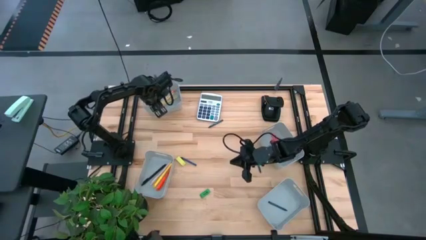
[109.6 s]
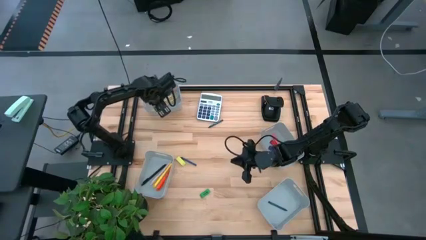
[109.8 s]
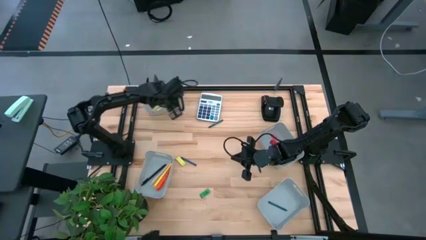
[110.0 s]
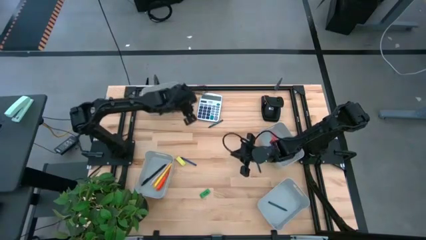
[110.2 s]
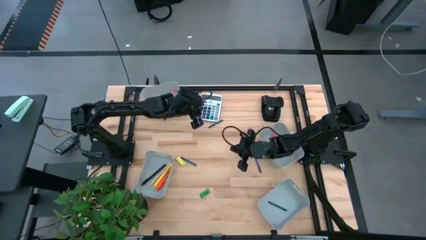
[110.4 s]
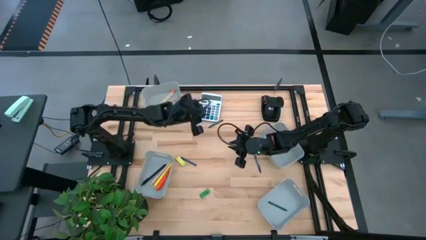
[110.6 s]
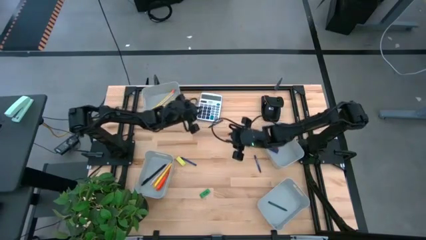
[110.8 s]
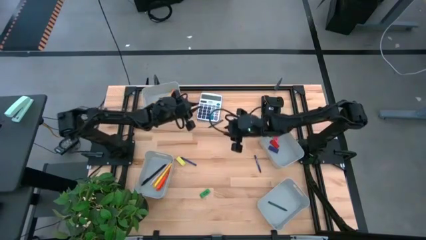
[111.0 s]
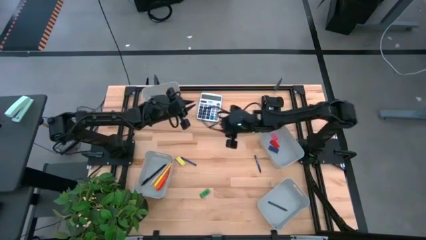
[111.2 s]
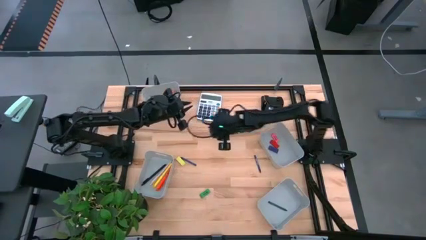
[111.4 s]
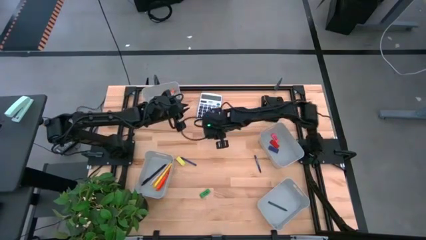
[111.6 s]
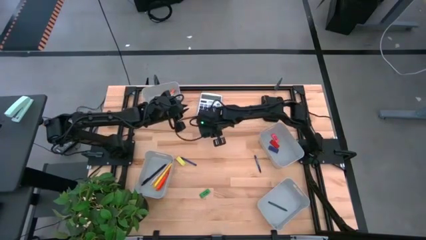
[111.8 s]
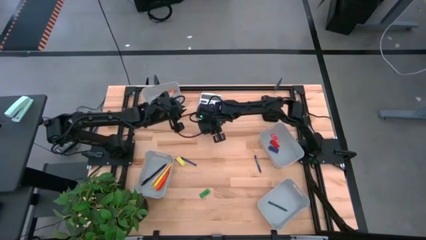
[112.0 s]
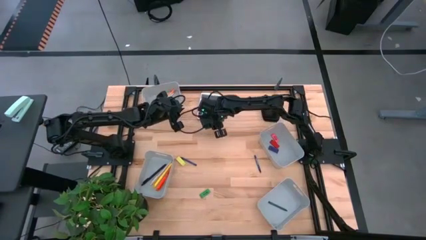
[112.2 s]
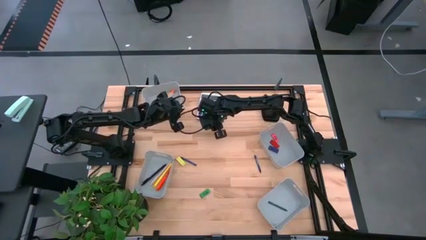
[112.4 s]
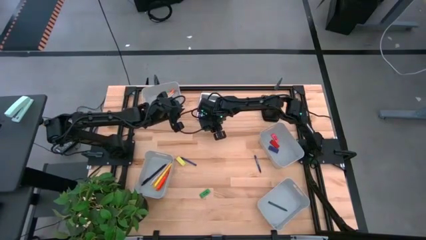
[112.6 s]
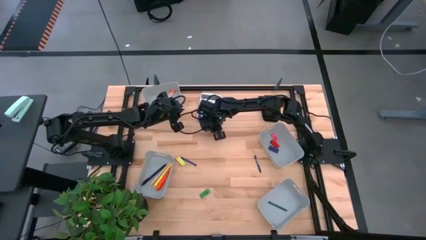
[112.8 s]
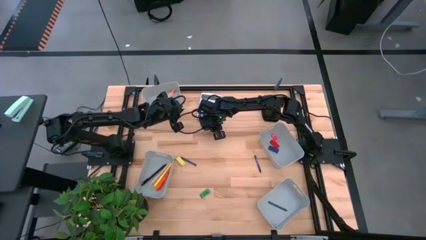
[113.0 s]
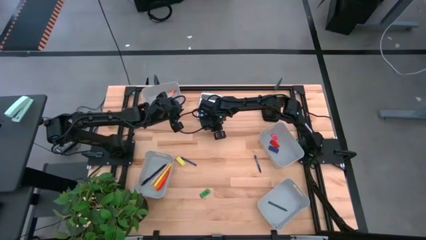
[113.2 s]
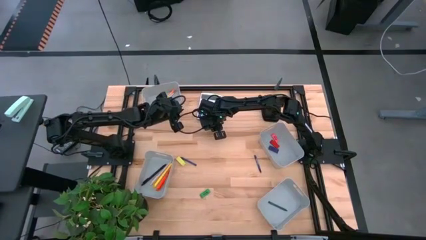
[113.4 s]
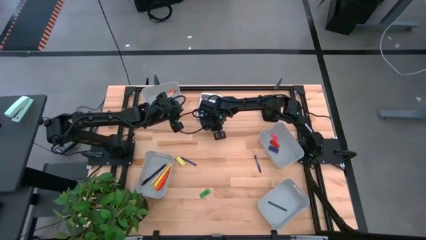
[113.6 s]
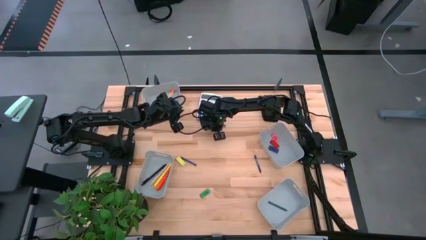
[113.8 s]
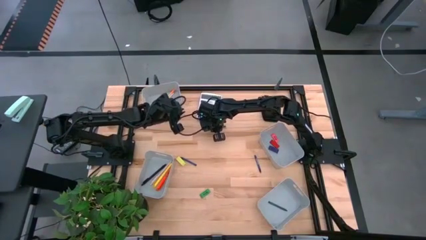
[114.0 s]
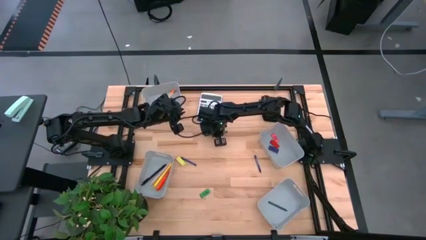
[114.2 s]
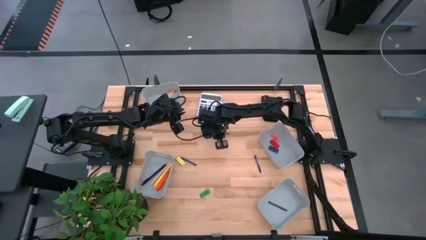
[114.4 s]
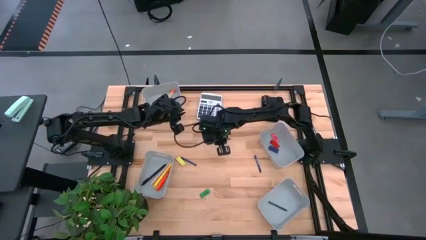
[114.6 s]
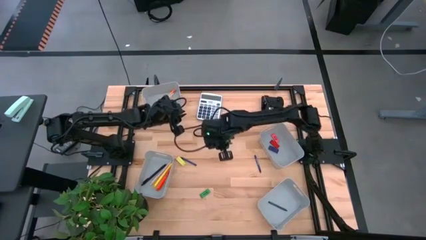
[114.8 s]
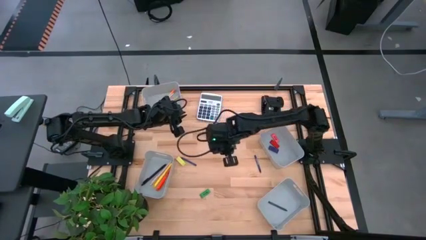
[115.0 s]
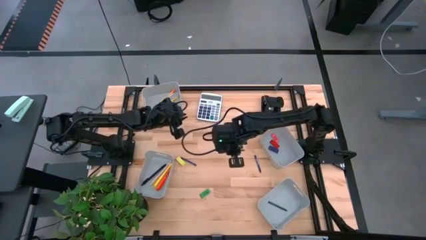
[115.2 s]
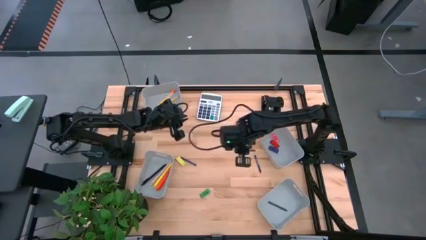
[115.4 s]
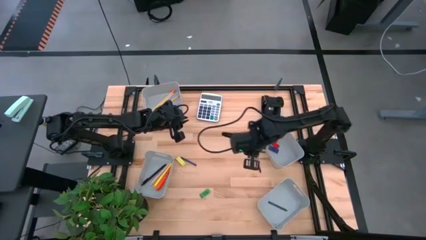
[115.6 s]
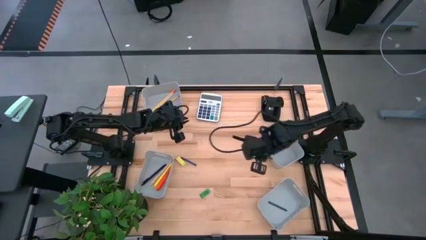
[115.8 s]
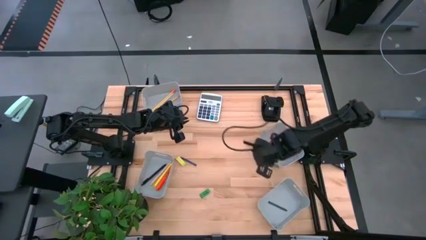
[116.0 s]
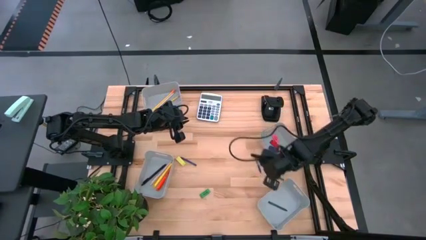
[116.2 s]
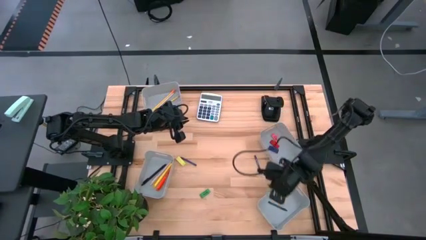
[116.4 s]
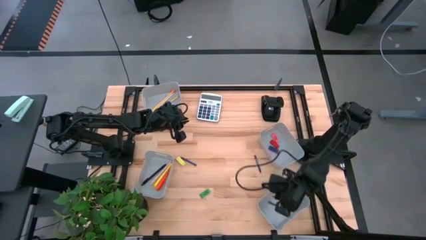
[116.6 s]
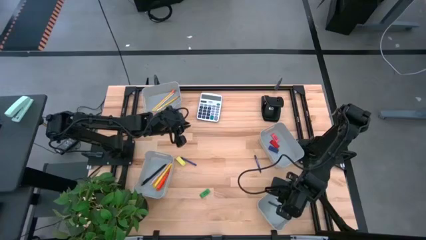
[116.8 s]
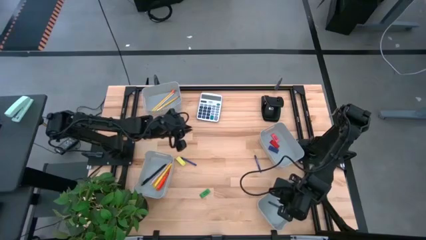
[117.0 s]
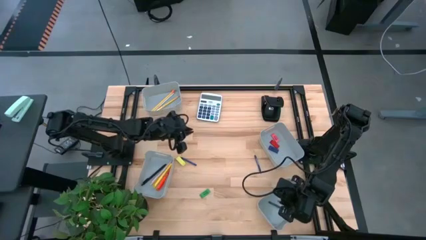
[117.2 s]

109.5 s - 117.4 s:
Task: Sort crayons/erasers/pens/pencils in bins
Put the green crayon into the bottom right gray bin

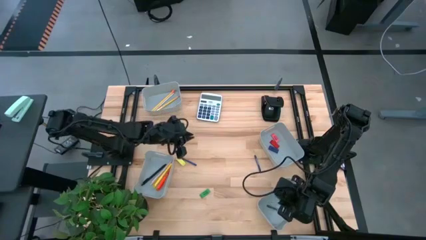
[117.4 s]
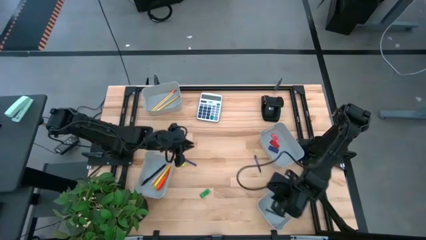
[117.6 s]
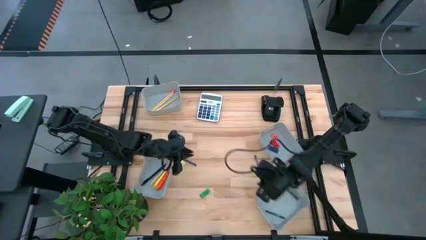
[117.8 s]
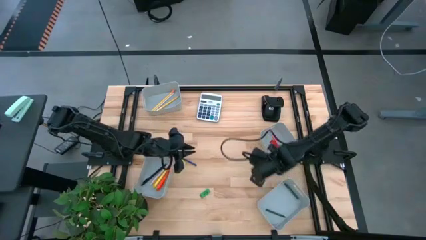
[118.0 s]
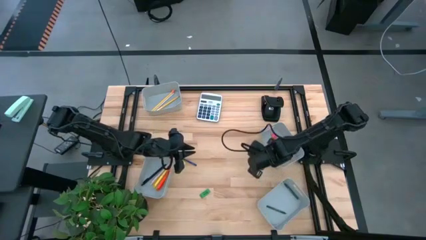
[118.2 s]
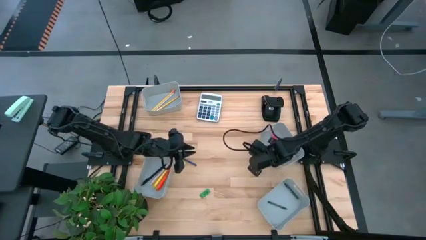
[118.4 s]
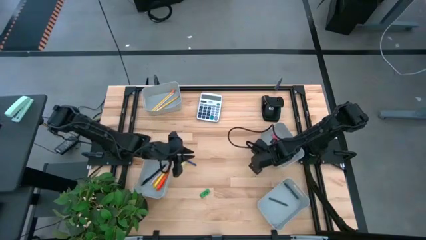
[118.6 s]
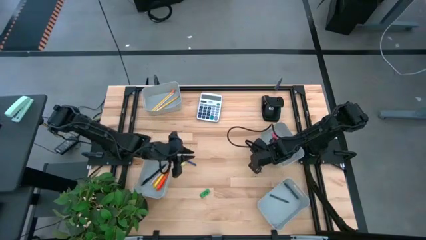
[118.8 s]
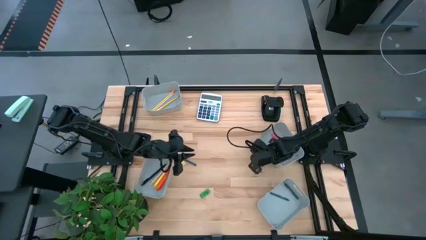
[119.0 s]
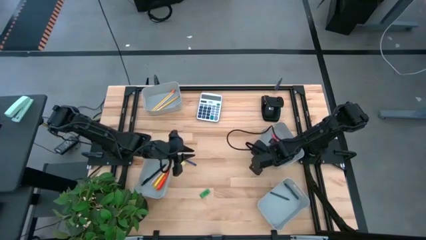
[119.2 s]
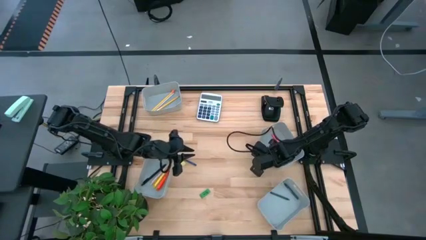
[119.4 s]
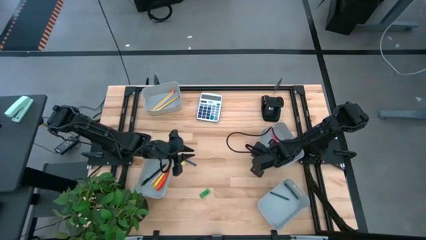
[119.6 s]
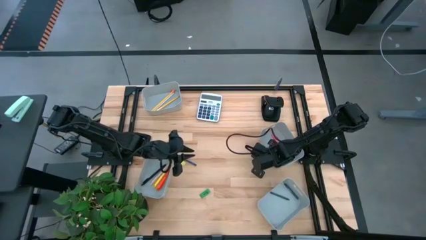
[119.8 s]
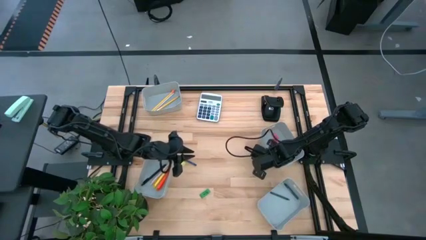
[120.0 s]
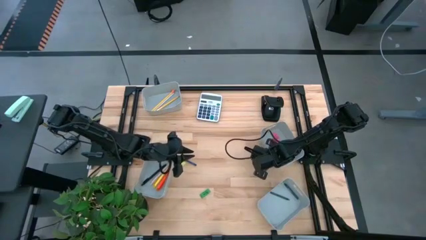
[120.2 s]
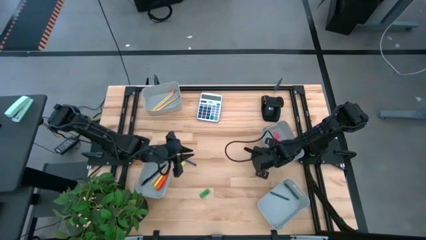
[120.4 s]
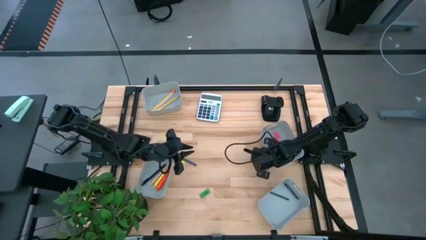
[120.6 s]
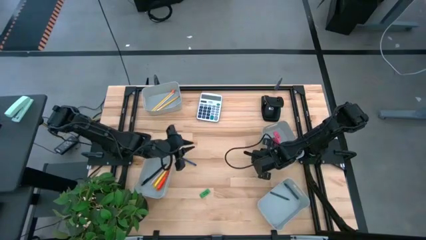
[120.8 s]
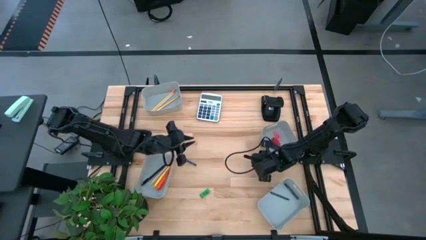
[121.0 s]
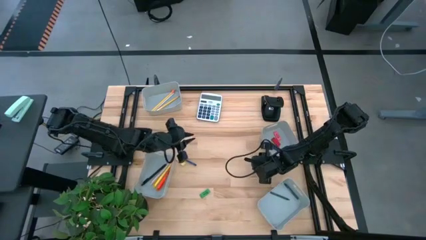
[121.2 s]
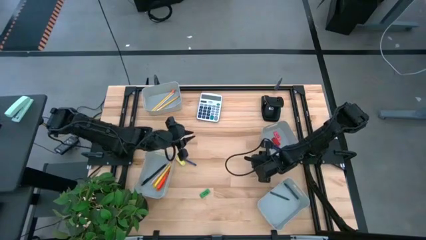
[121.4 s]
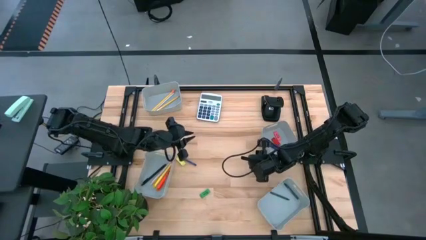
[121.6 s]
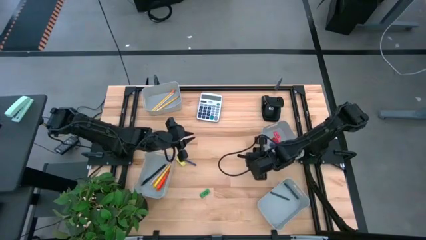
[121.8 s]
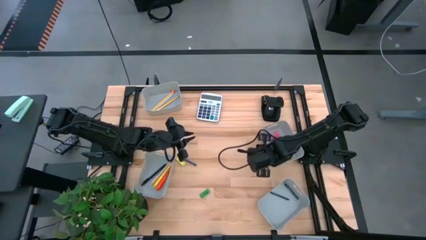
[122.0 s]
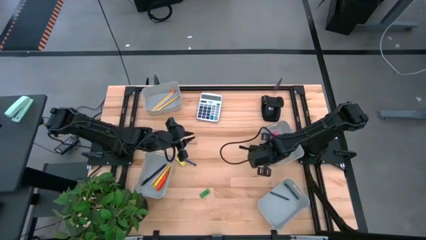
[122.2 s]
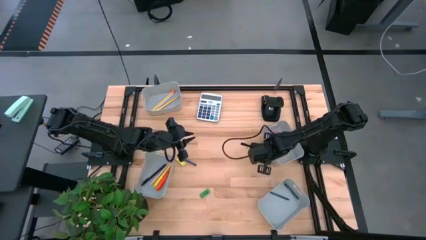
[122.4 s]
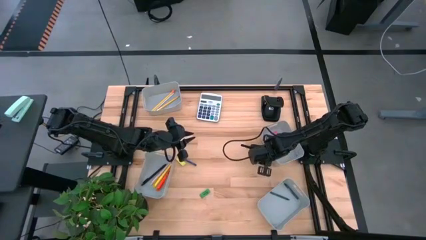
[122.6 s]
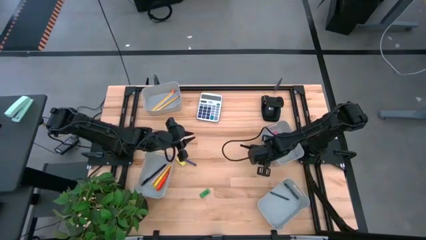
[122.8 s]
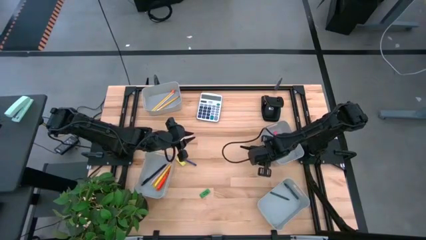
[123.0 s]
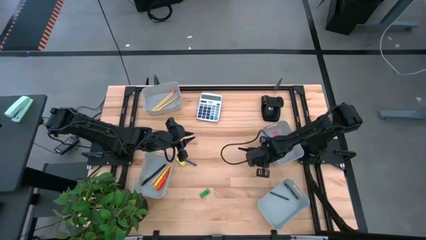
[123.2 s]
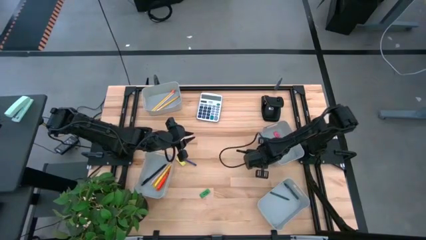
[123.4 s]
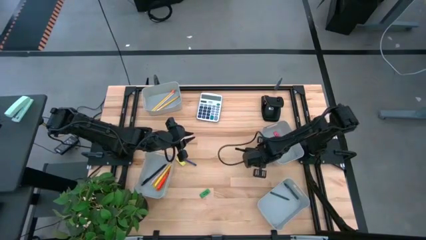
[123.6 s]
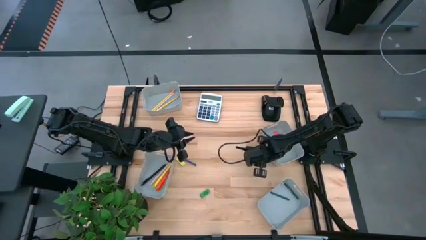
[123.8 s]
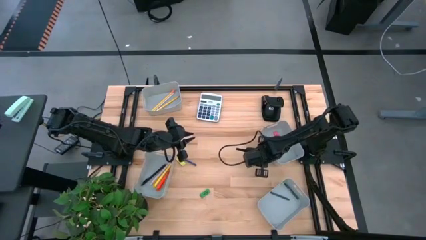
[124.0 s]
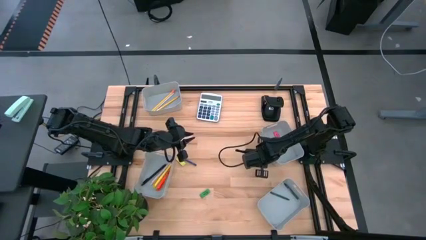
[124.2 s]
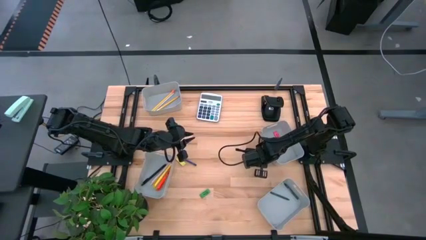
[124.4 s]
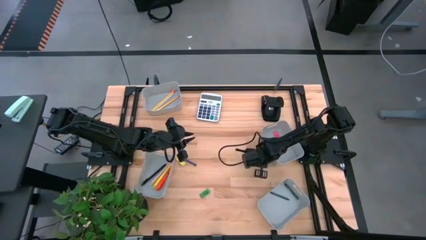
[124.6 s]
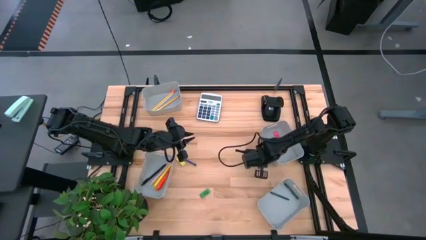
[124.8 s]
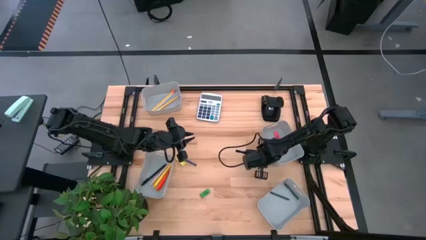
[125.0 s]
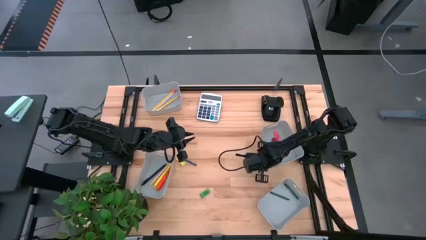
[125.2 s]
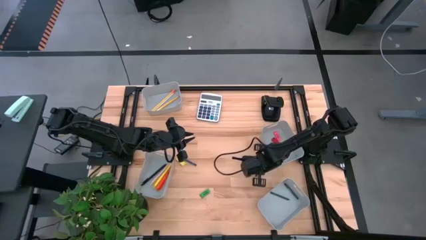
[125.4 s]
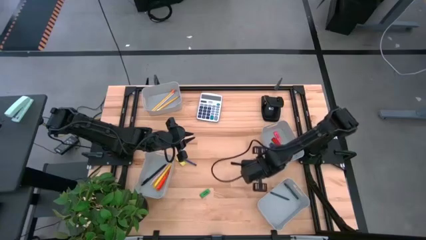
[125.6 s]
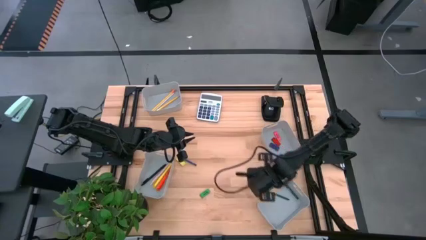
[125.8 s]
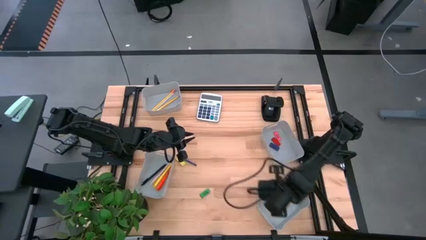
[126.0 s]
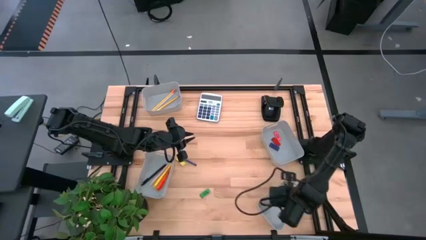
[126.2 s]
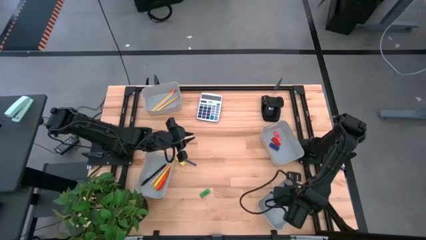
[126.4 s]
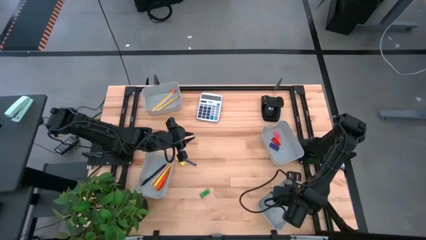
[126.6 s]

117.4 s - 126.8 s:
Put the right blue crayon into the bottom right gray bin
